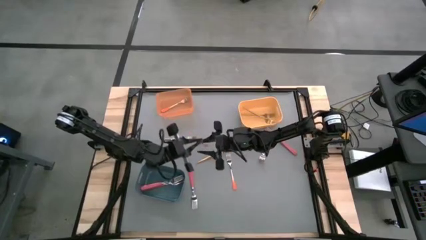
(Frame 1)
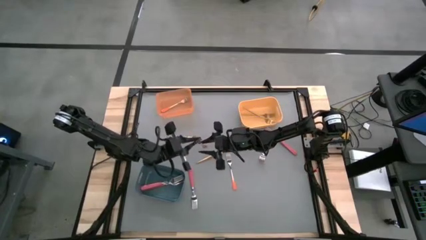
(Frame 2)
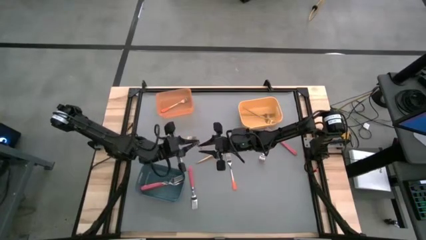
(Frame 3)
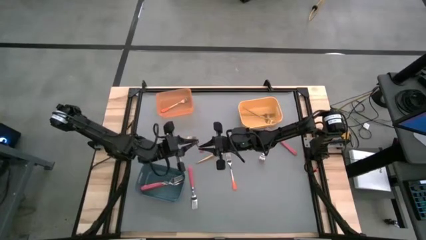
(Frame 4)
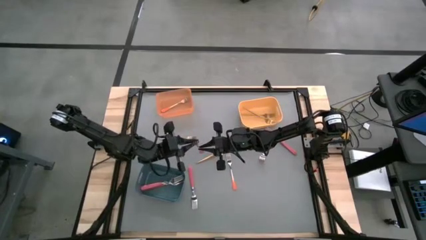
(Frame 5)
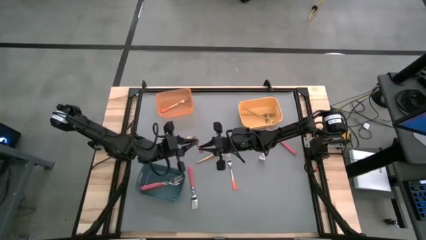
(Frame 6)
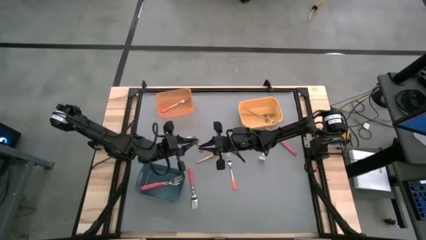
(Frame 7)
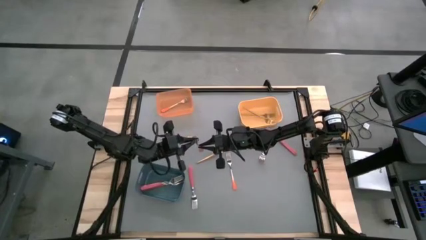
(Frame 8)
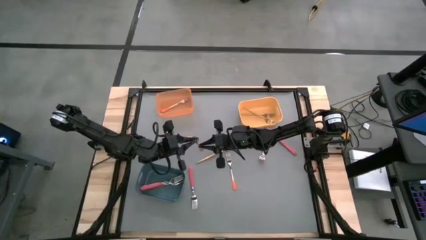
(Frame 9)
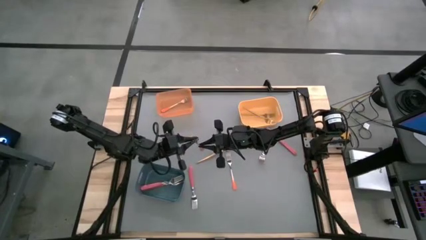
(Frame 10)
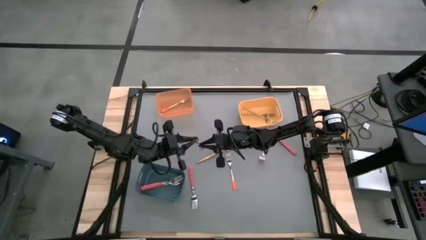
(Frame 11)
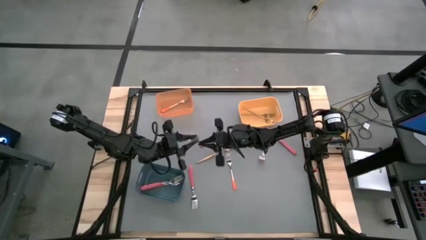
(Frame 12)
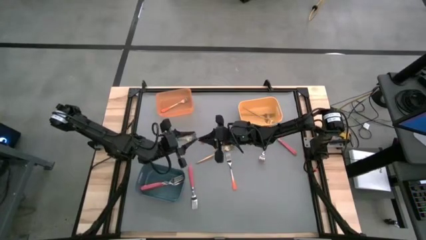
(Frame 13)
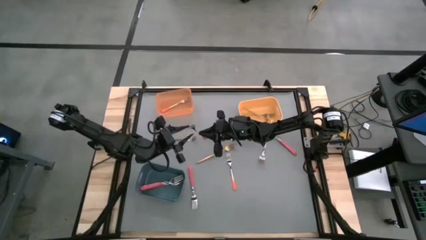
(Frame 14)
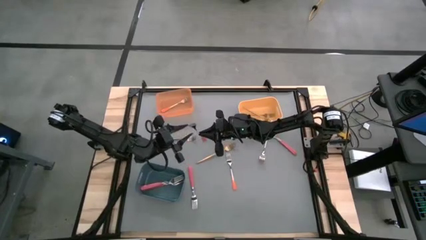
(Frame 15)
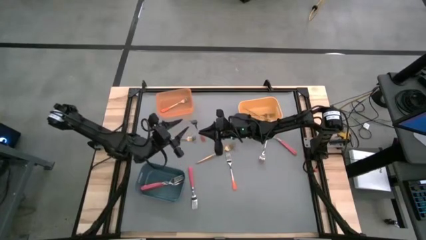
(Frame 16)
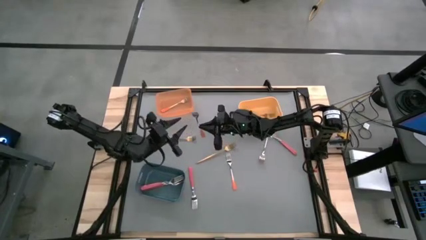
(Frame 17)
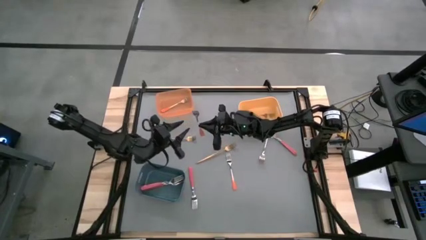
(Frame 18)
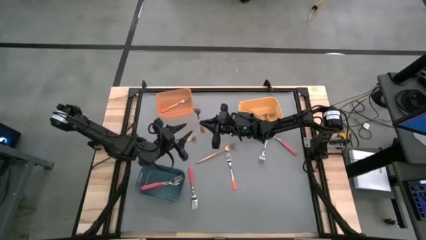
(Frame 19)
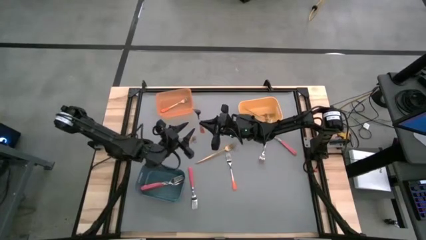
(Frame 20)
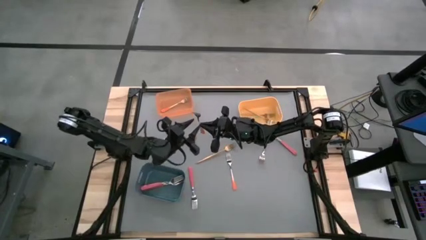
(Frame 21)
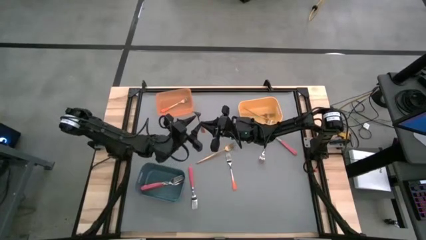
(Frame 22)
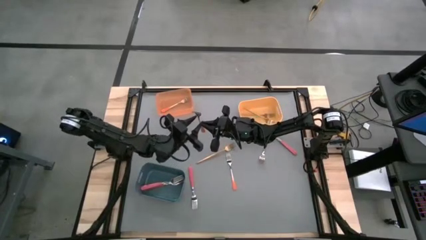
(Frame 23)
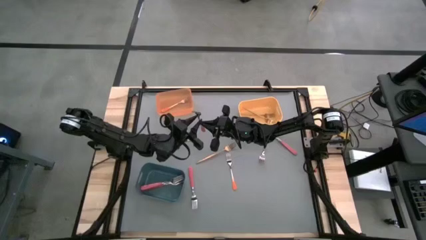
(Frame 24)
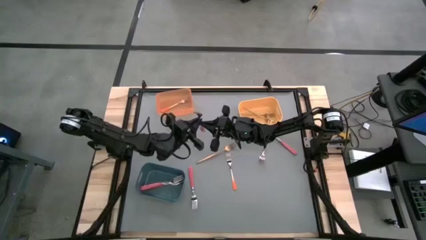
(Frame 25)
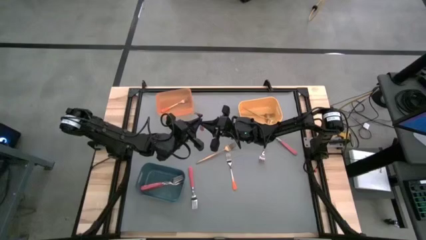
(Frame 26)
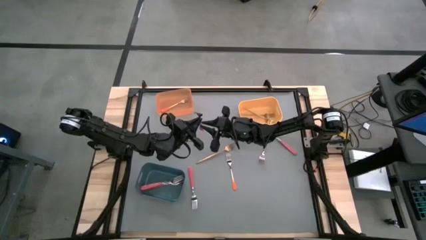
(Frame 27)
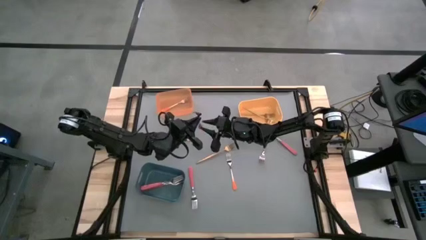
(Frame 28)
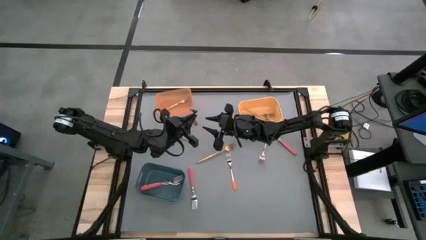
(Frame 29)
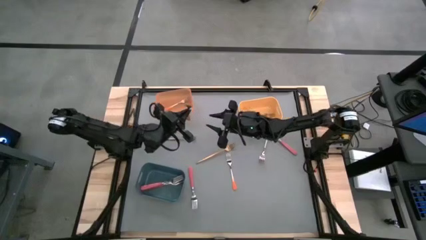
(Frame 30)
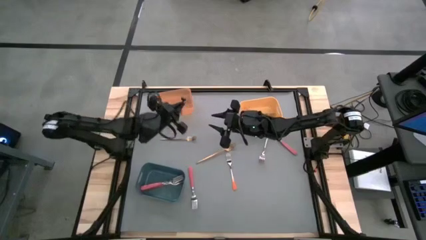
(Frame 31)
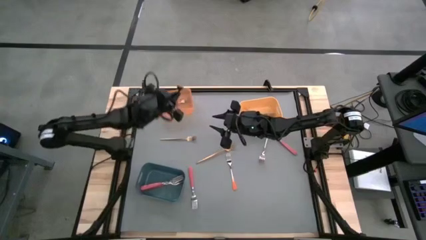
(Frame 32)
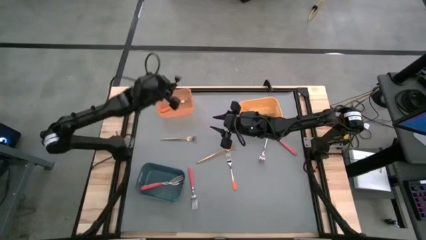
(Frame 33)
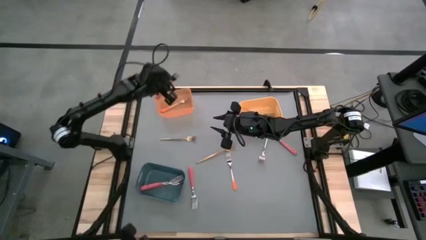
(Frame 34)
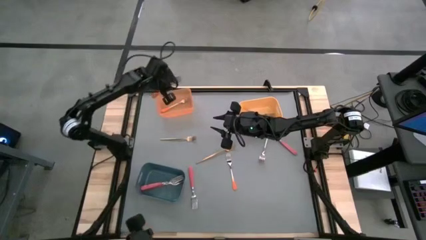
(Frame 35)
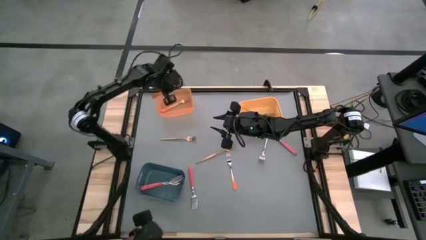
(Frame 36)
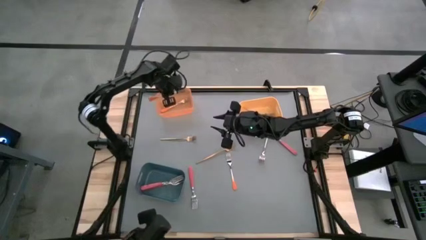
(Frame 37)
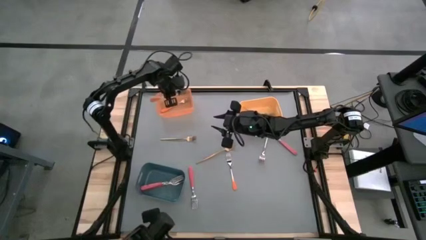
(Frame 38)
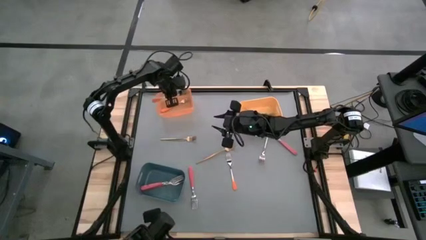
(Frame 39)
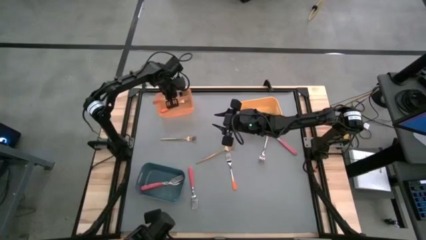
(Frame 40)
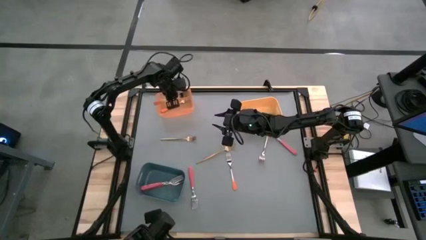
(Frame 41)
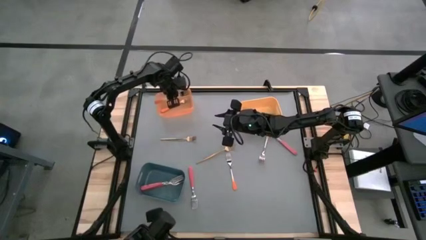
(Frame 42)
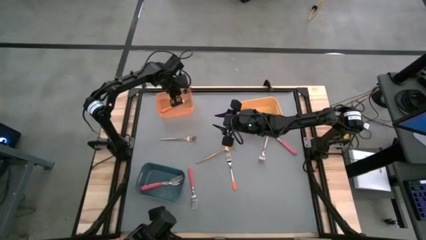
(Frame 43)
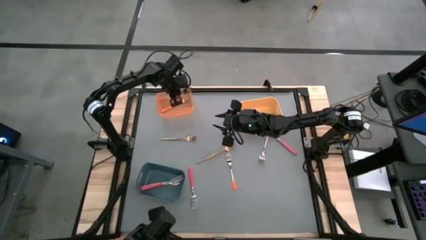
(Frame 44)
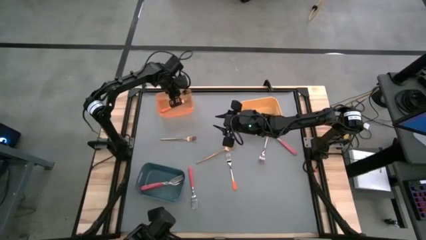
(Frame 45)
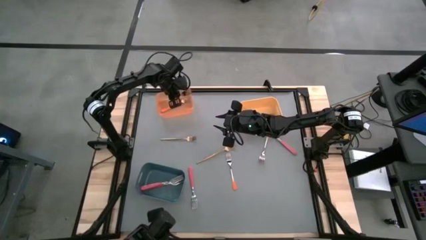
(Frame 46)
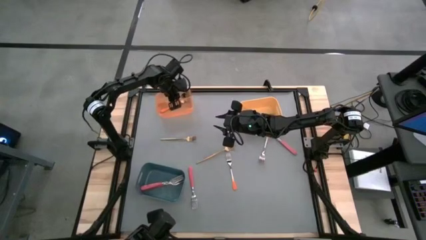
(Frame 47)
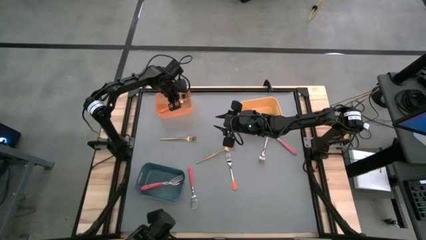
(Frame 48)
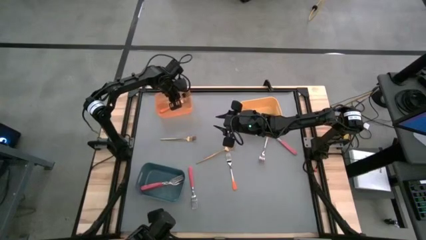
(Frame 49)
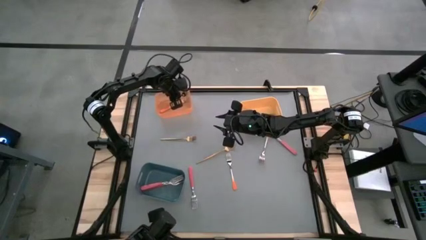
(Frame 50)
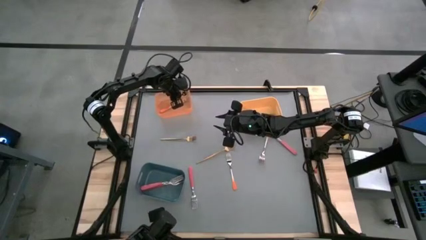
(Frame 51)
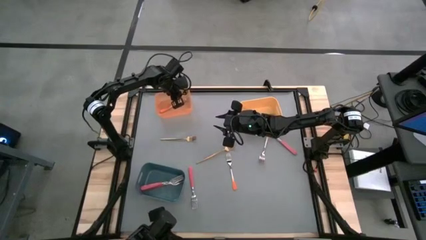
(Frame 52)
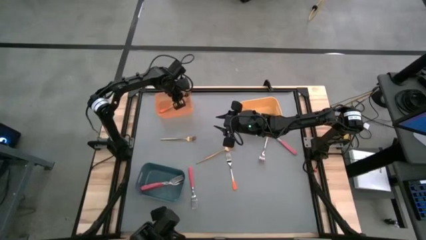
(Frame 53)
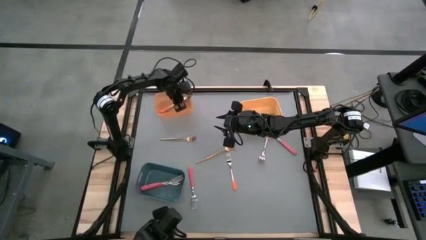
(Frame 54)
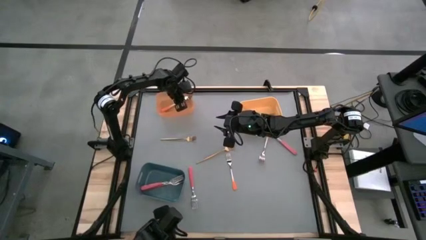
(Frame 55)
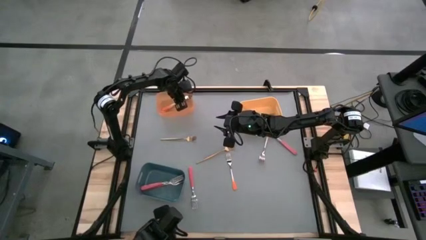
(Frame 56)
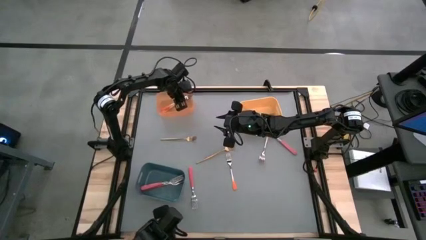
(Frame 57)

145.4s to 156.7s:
Task: Sort silverware by color (type)
Put the orange fork into the orange bin
